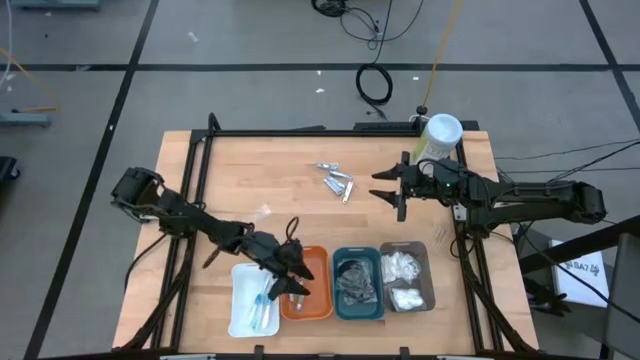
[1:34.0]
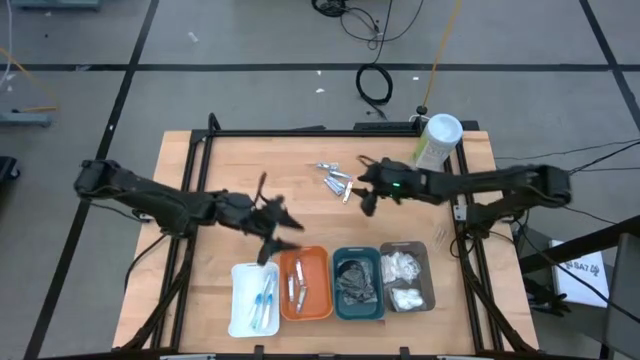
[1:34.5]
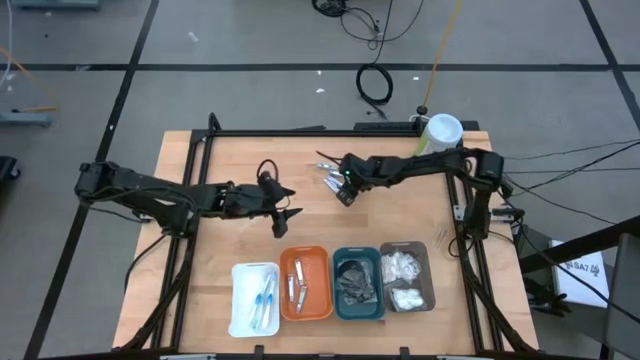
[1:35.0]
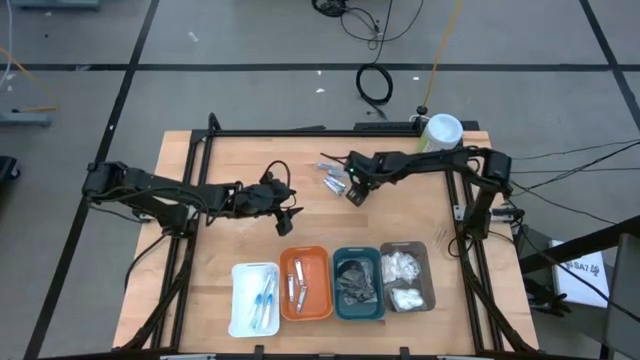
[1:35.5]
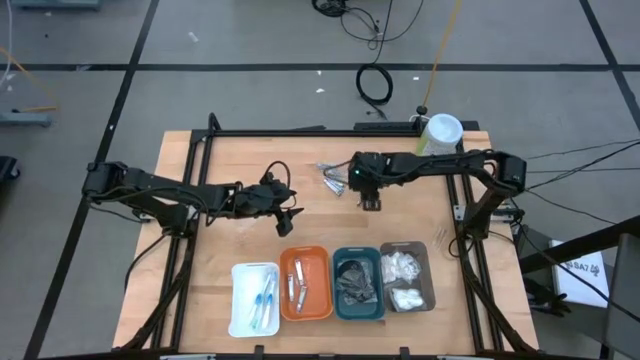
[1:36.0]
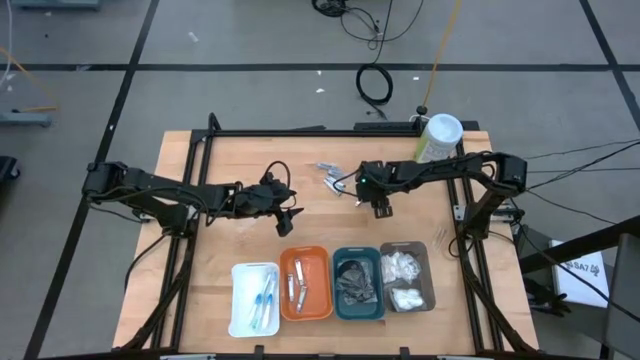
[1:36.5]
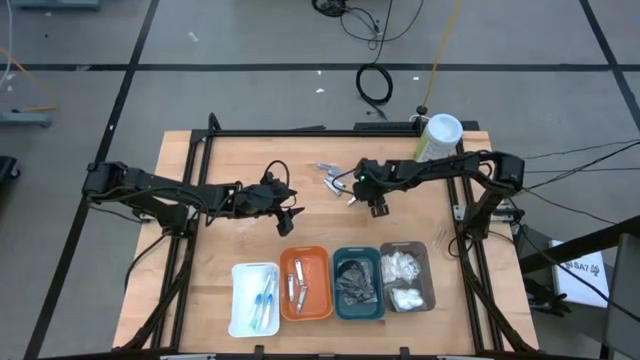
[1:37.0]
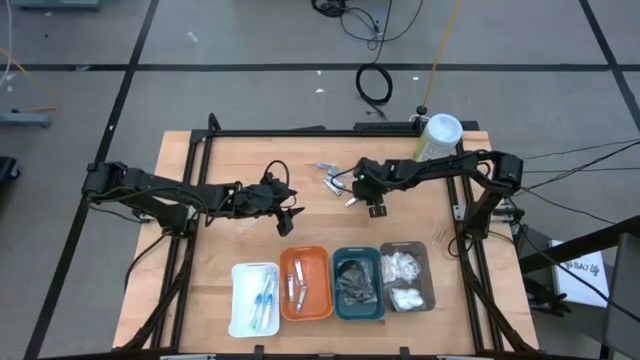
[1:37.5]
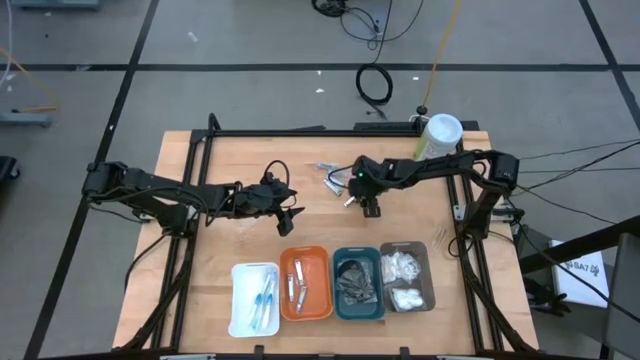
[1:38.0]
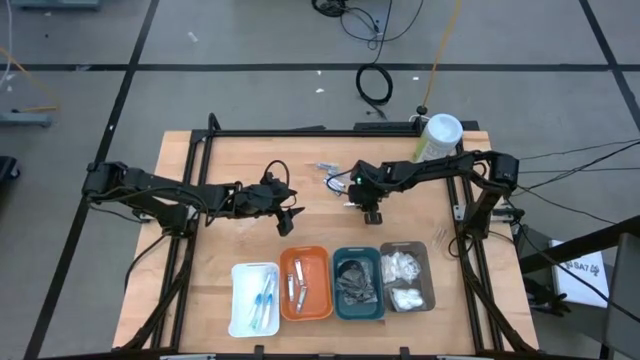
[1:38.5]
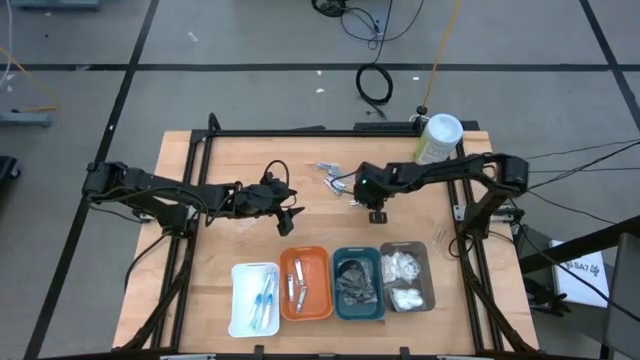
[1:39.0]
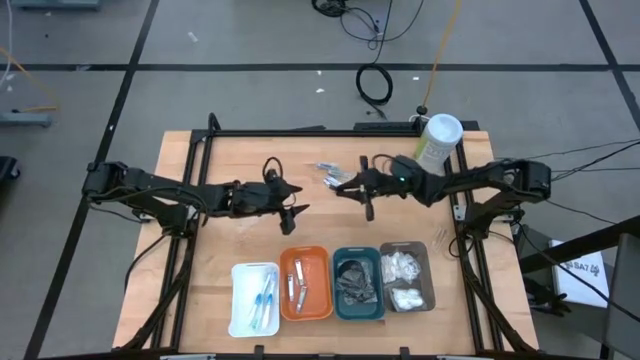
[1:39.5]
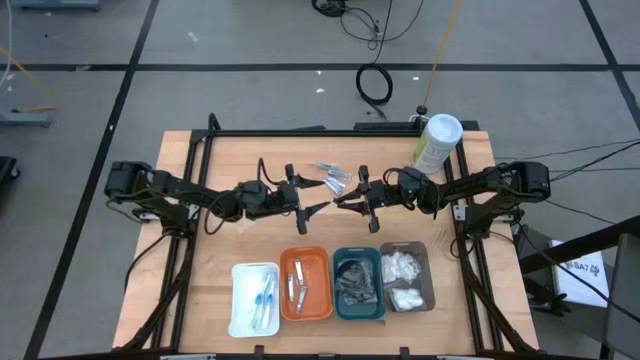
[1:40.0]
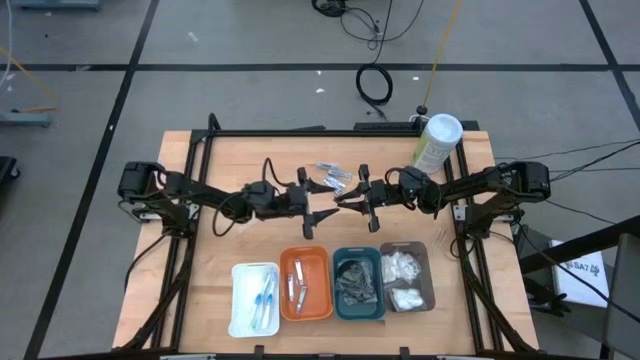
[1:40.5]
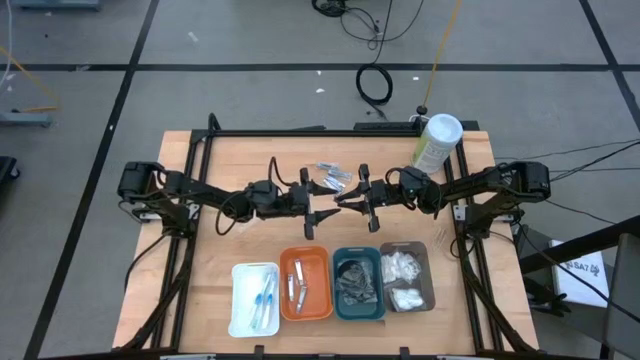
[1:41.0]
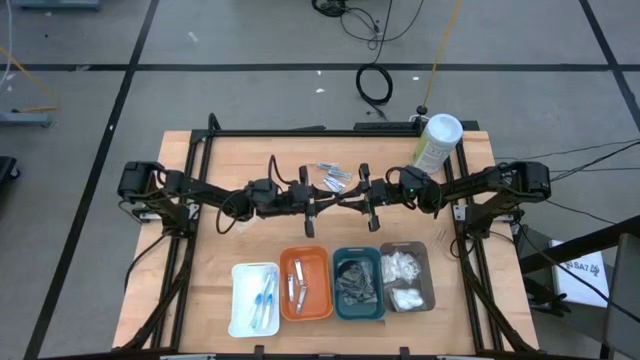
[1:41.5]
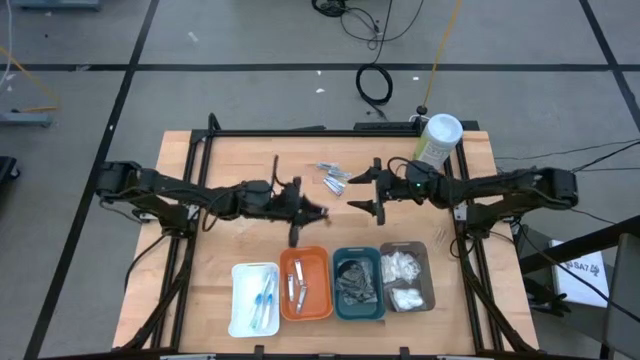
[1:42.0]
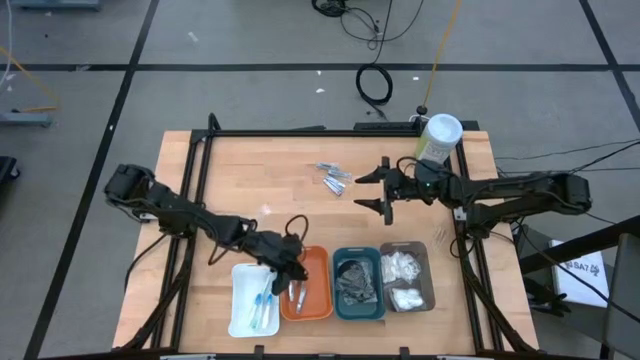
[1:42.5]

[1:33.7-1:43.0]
Task: Pick & Place Travel size toiletries
Put the silver nail cutter into the orange bin

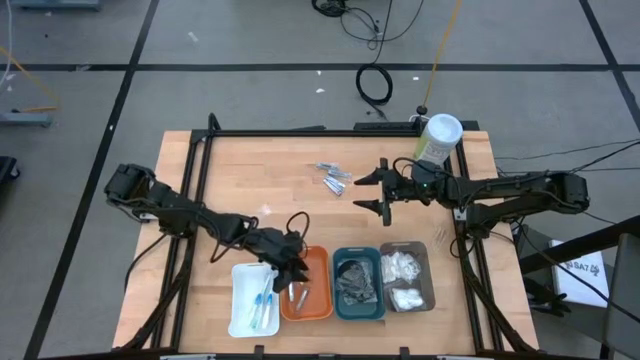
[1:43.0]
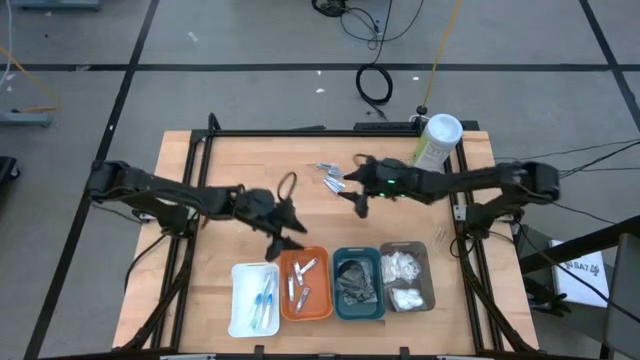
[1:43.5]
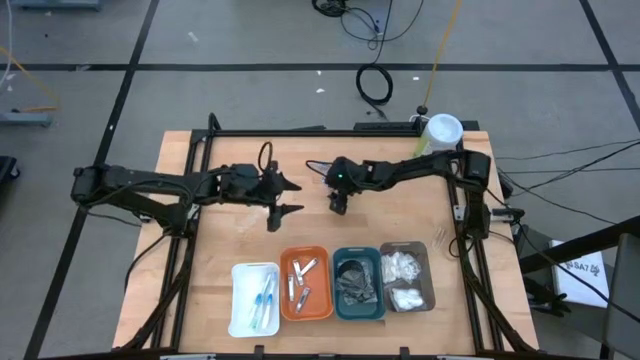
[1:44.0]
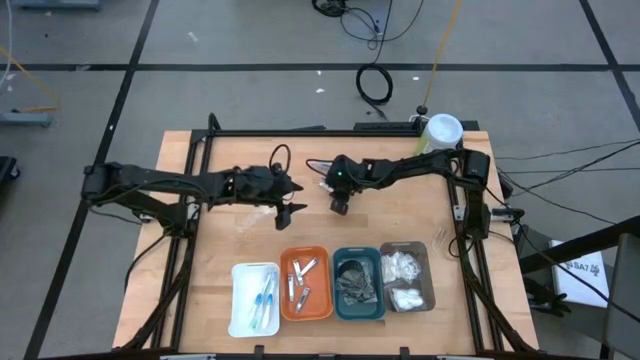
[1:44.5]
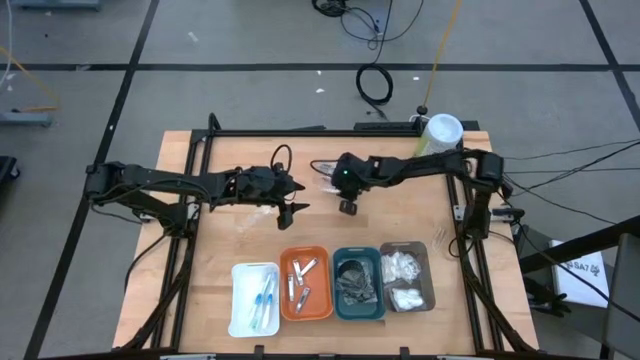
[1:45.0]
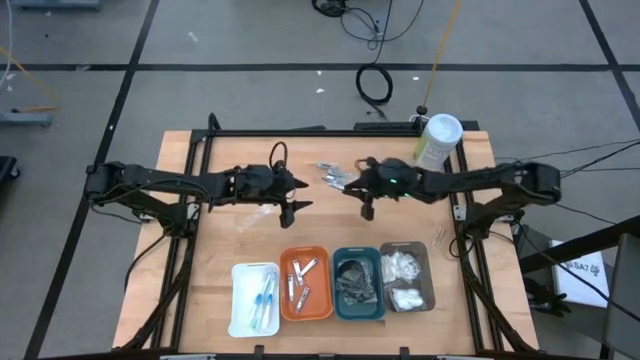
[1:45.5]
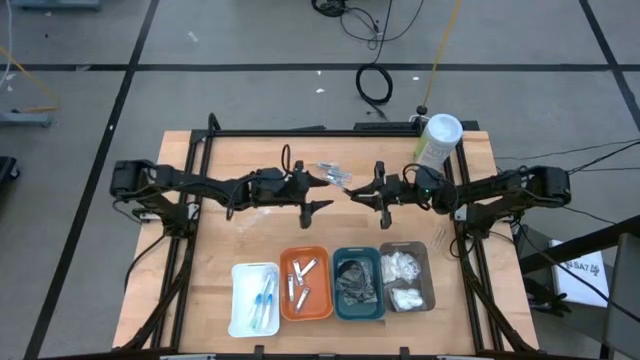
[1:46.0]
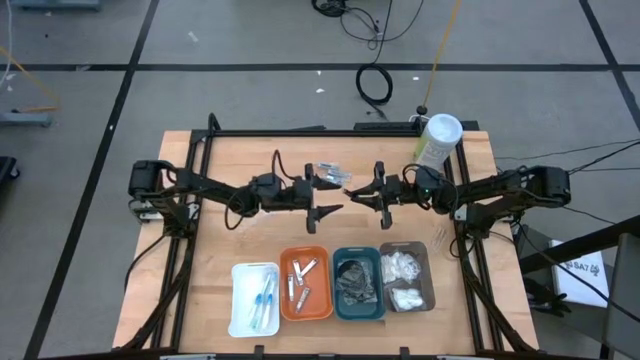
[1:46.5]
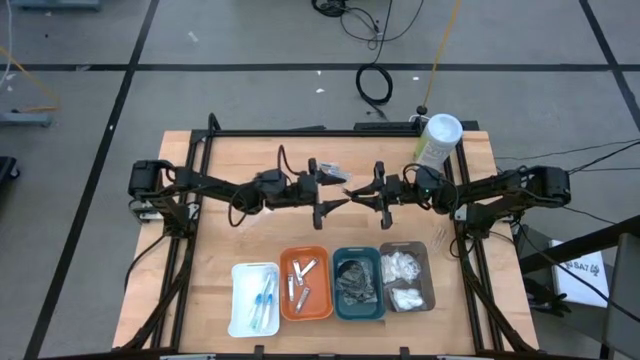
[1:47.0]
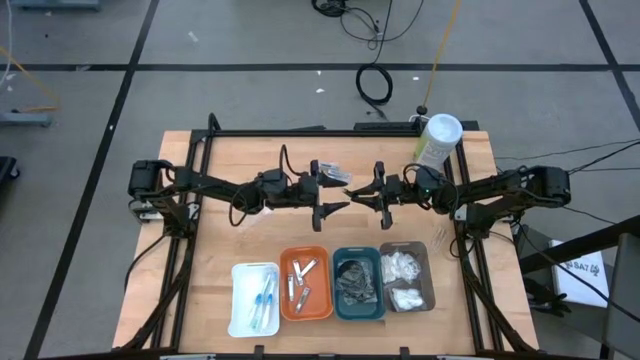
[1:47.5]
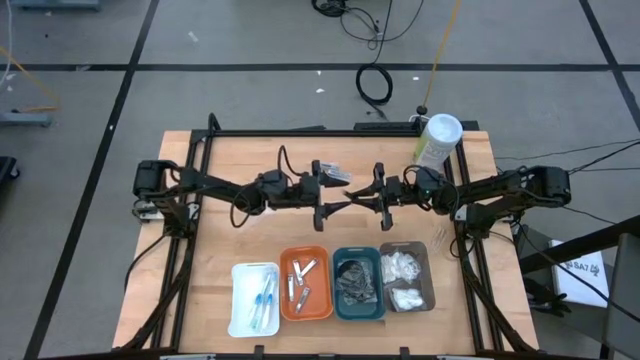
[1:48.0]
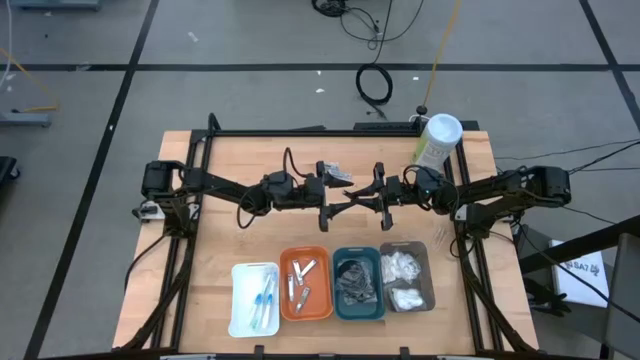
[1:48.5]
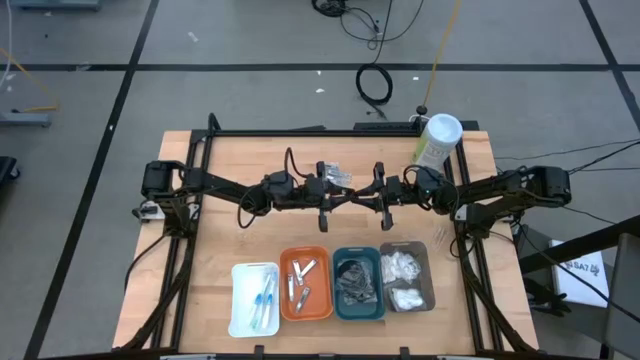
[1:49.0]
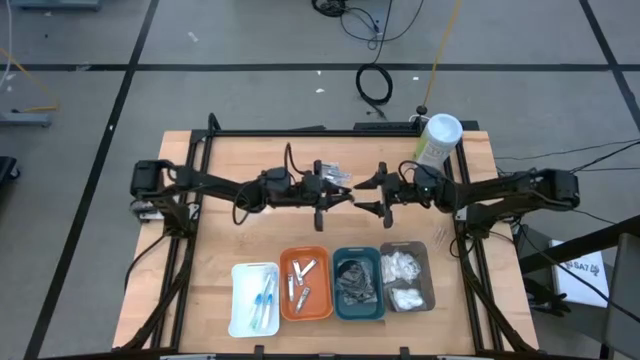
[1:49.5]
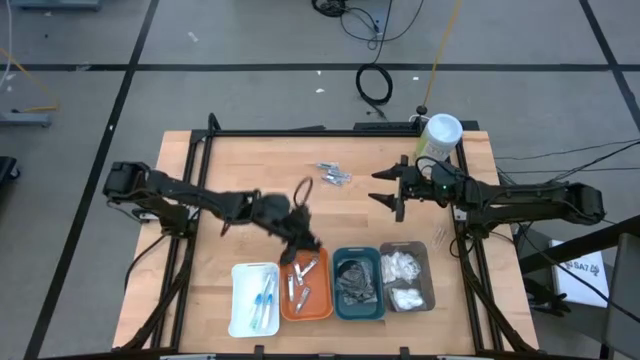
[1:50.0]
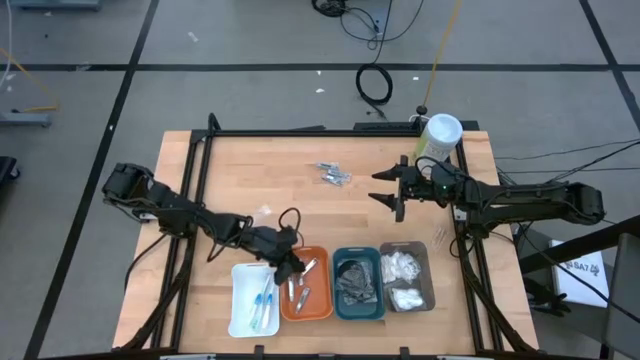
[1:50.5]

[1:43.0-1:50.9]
Put the silver nail cutter into the orange bin

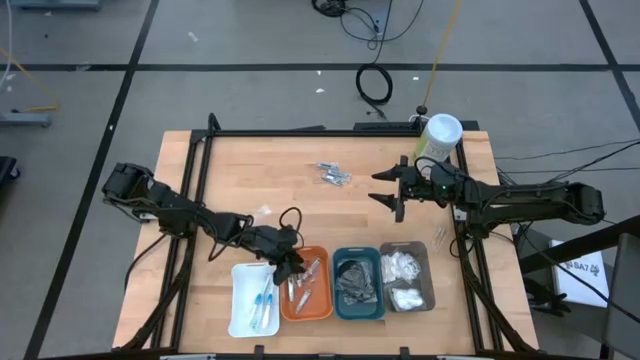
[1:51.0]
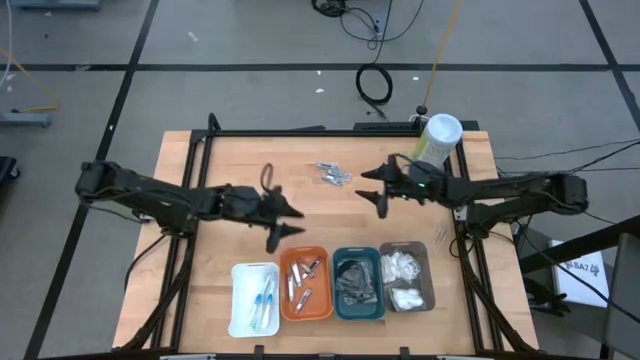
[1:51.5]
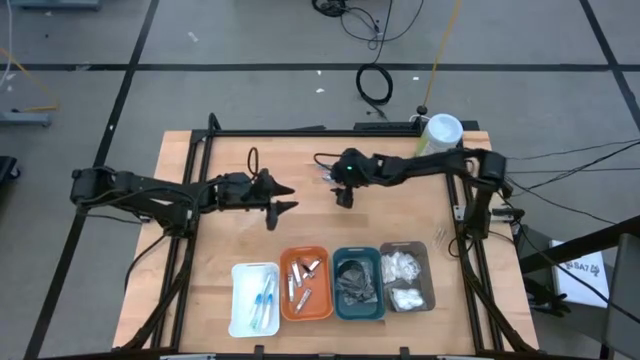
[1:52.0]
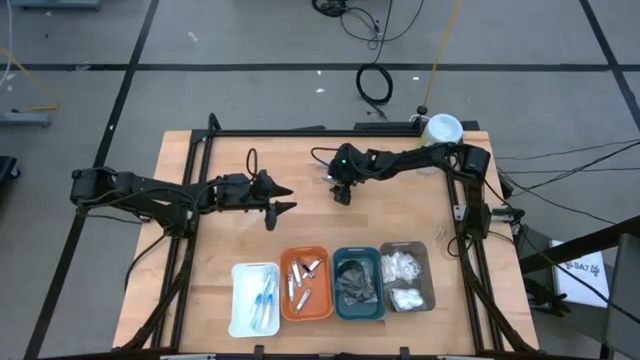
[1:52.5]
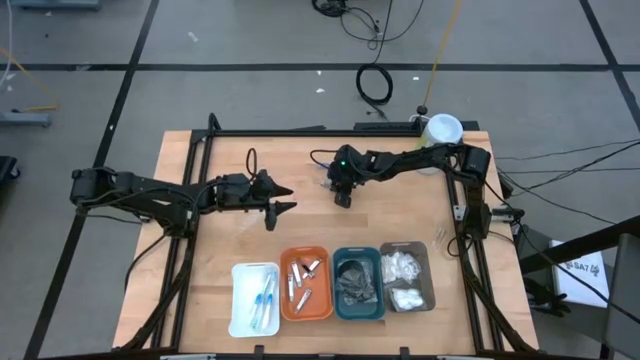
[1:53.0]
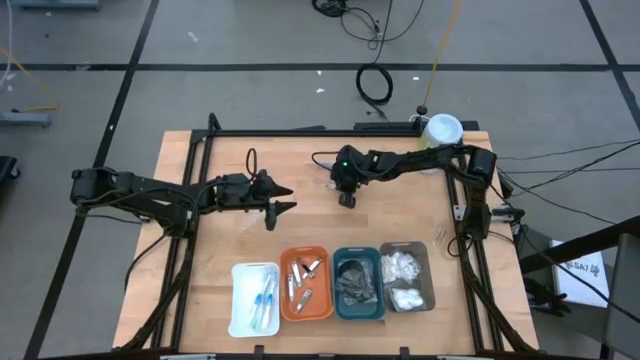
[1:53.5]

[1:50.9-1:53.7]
Put the silver nail cutter into the orange bin

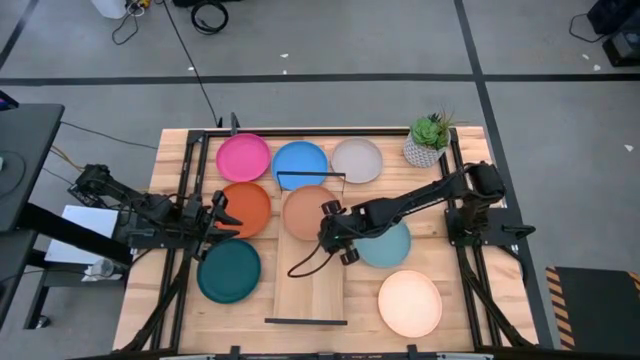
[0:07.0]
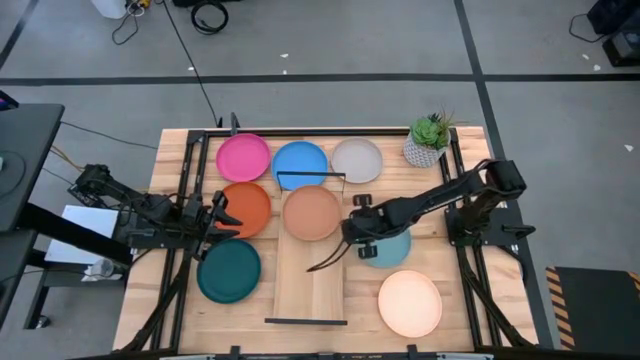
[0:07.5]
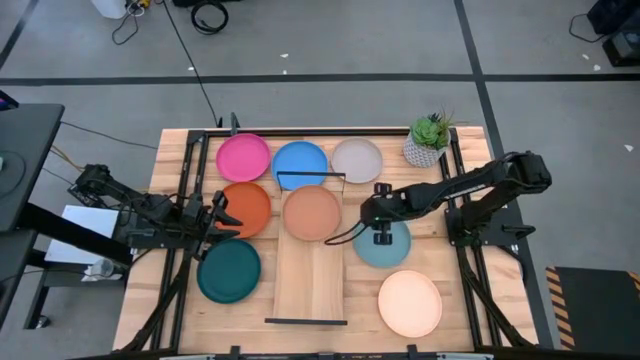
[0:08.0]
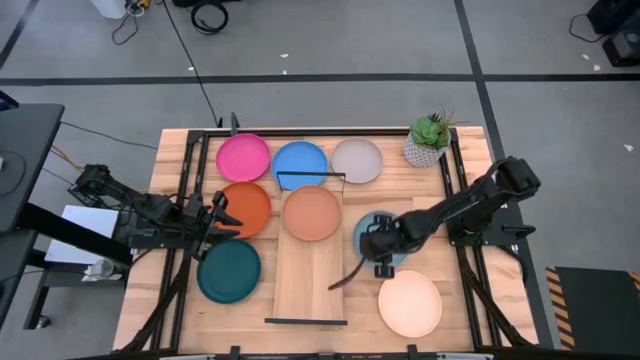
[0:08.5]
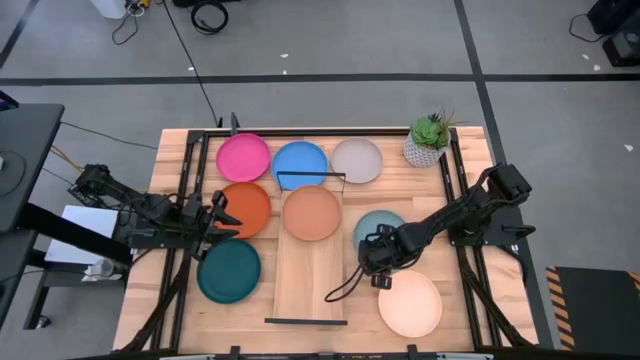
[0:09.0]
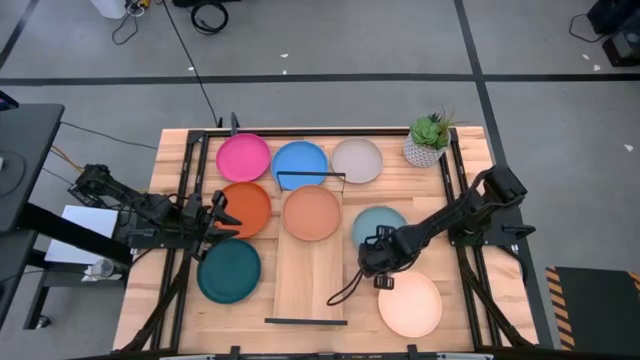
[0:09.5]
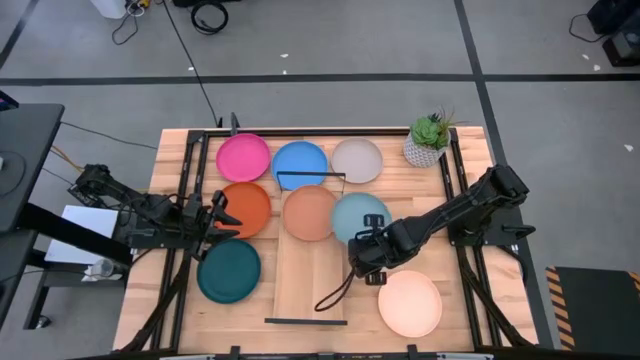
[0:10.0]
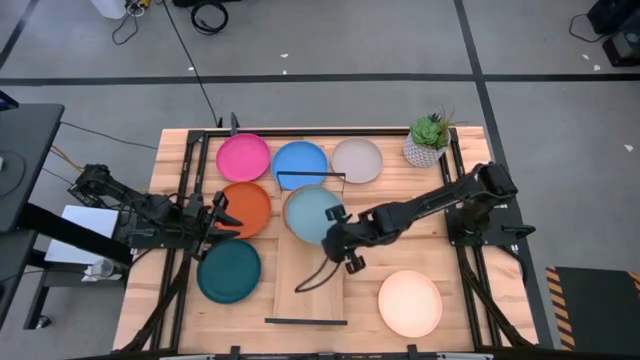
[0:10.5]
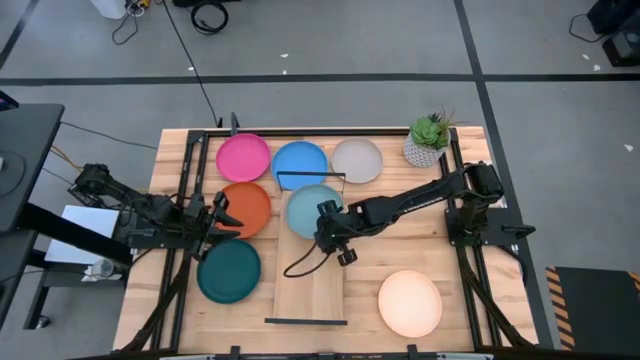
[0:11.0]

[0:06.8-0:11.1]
Task: Place and stack plates onto a shelf
Stack the light blue plate on top of the brown plate on the shelf
